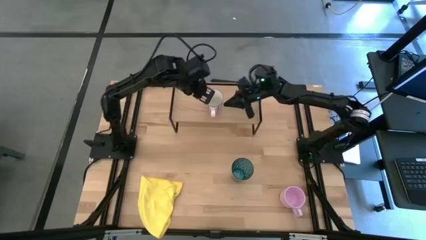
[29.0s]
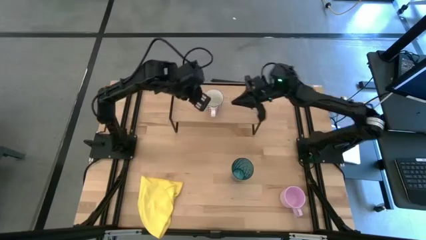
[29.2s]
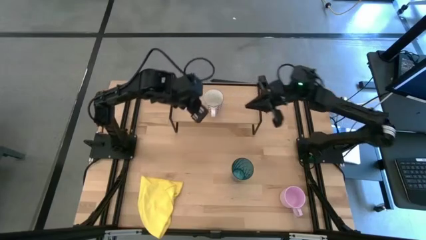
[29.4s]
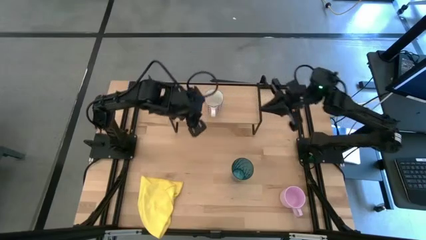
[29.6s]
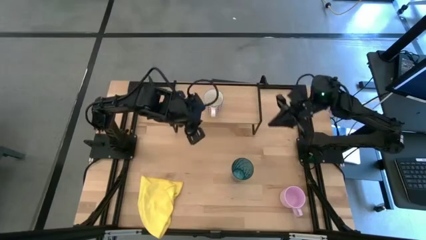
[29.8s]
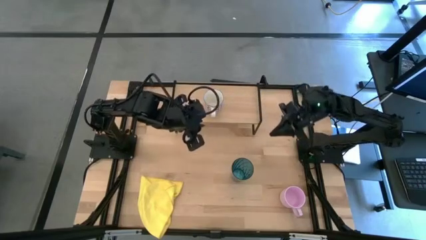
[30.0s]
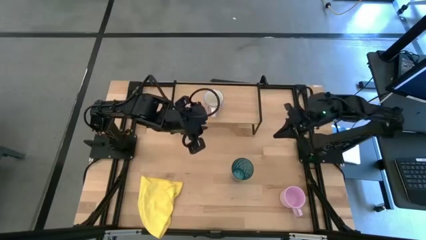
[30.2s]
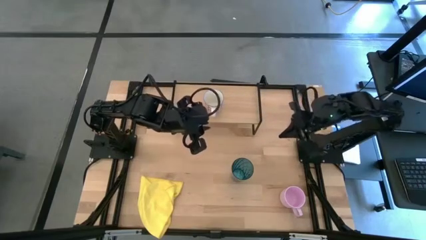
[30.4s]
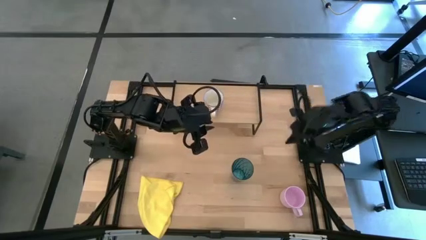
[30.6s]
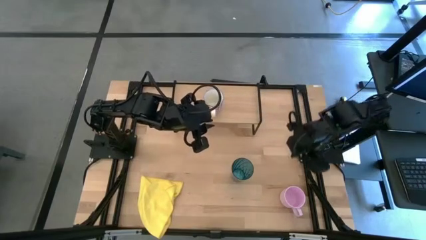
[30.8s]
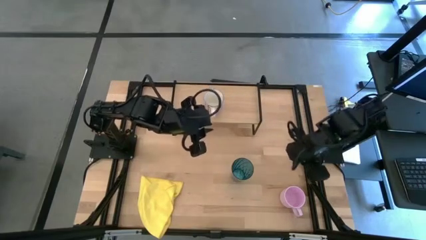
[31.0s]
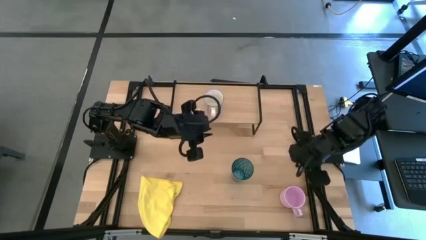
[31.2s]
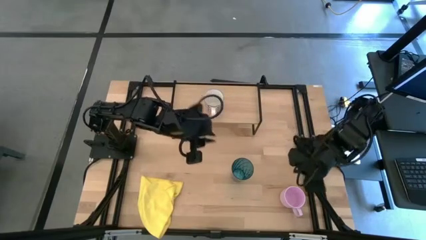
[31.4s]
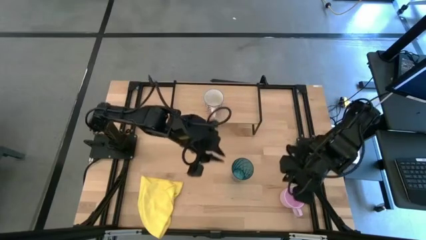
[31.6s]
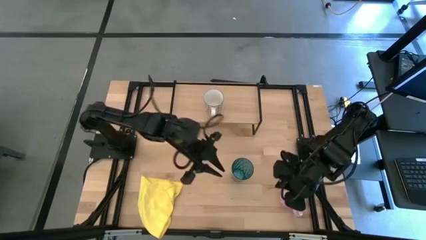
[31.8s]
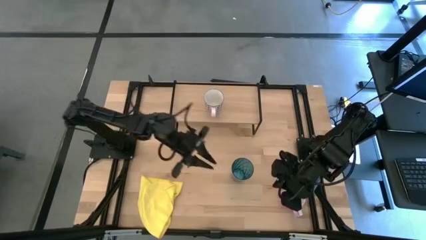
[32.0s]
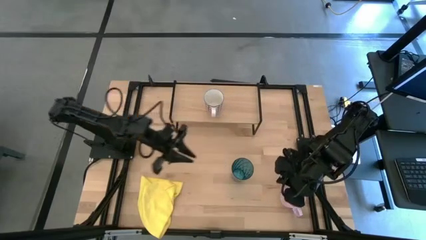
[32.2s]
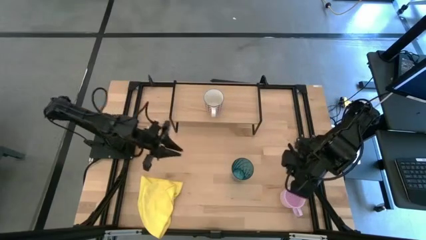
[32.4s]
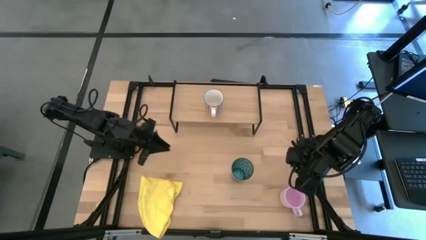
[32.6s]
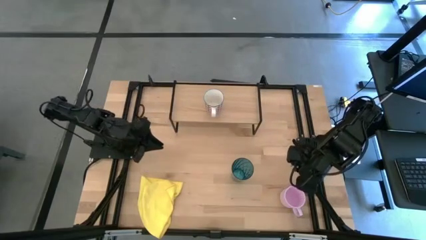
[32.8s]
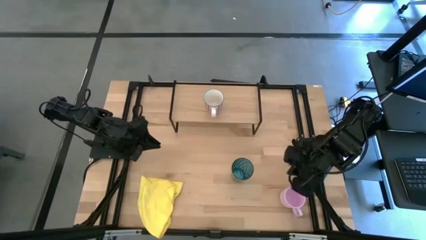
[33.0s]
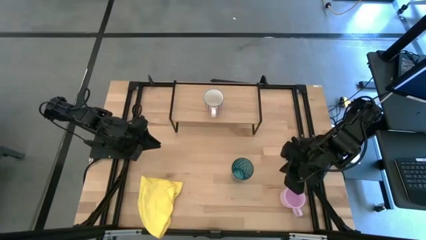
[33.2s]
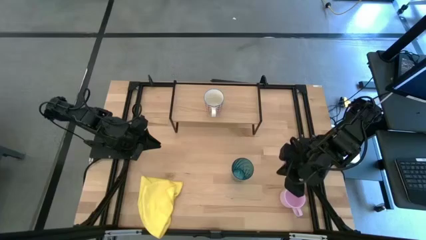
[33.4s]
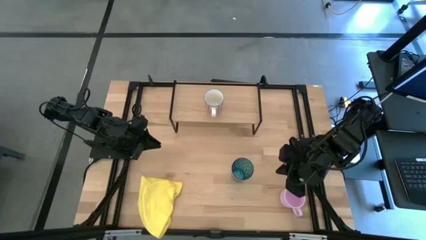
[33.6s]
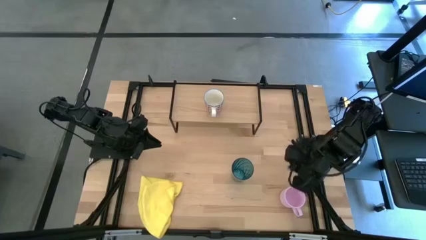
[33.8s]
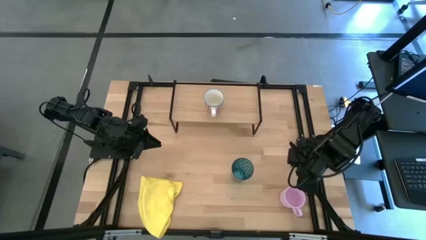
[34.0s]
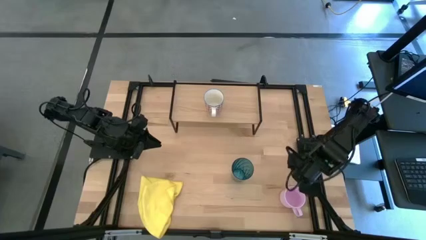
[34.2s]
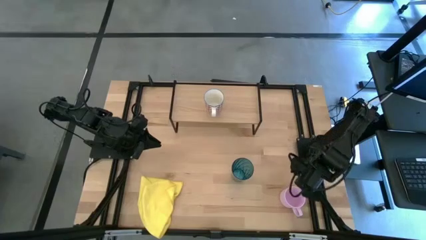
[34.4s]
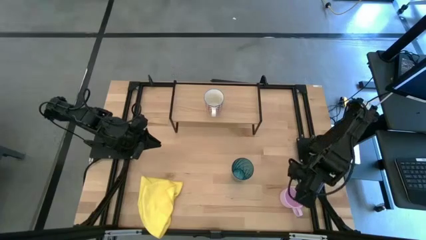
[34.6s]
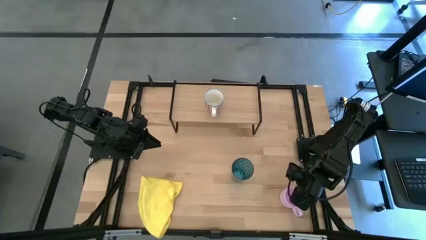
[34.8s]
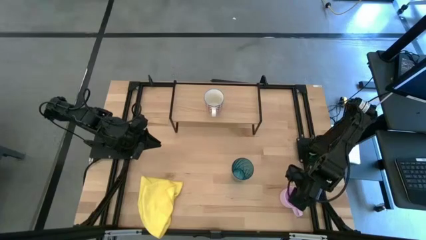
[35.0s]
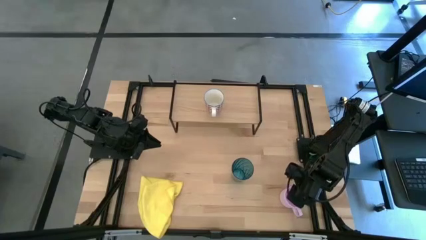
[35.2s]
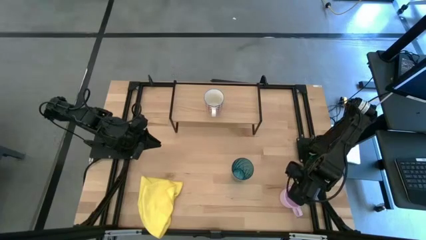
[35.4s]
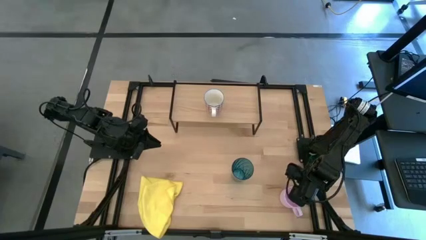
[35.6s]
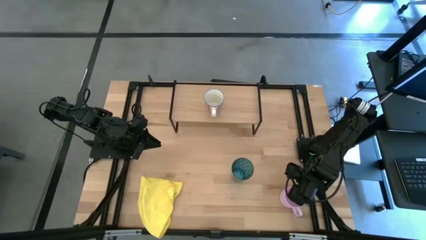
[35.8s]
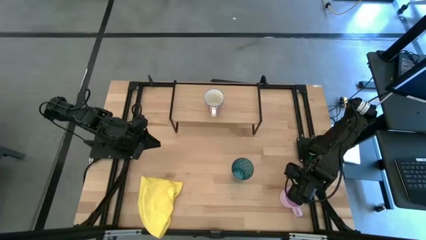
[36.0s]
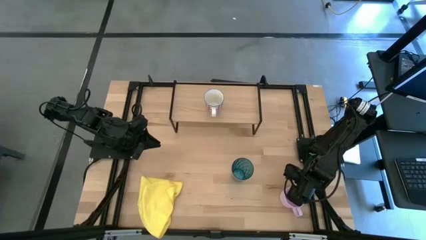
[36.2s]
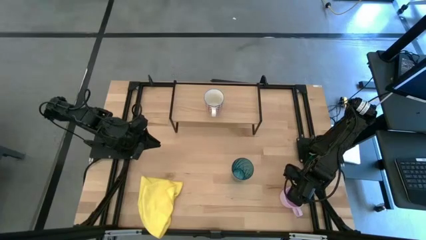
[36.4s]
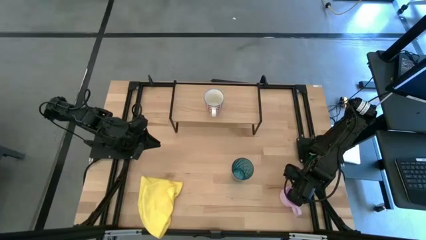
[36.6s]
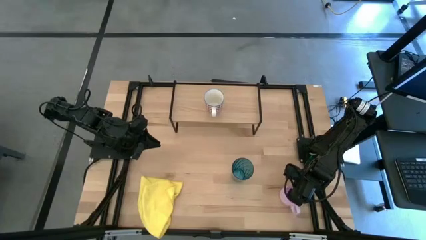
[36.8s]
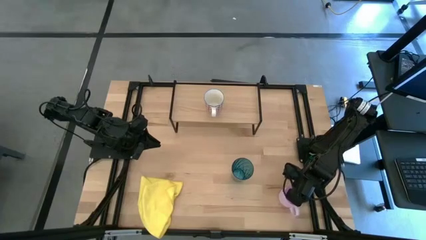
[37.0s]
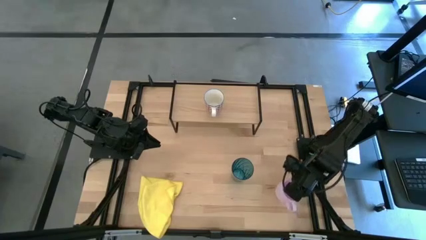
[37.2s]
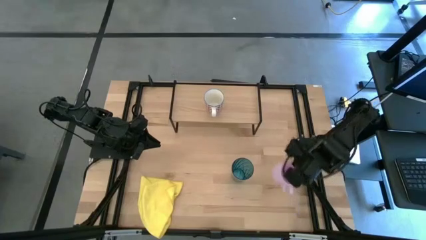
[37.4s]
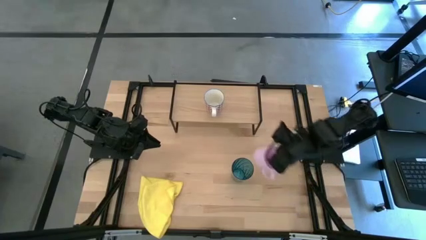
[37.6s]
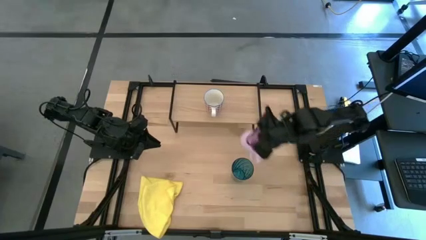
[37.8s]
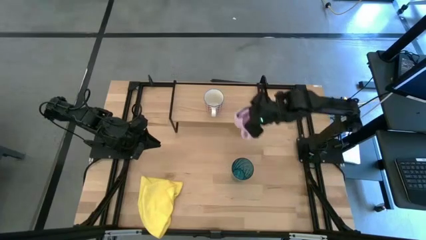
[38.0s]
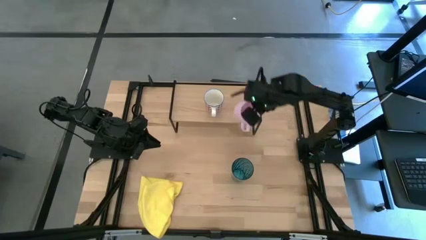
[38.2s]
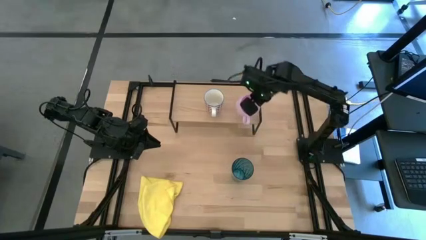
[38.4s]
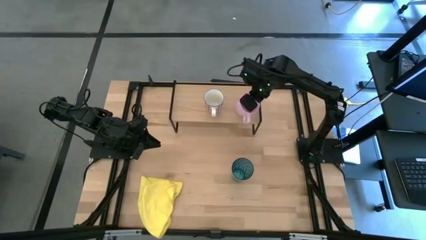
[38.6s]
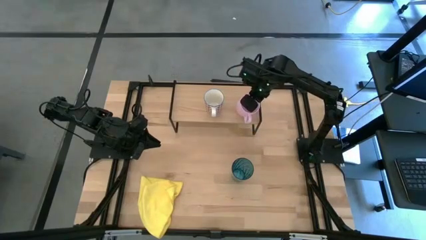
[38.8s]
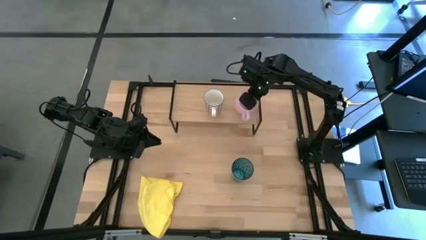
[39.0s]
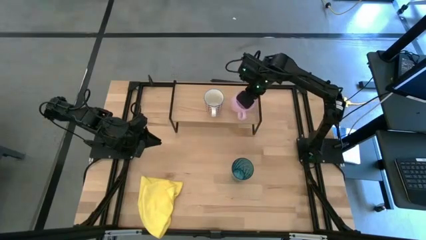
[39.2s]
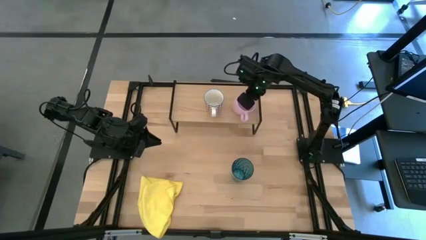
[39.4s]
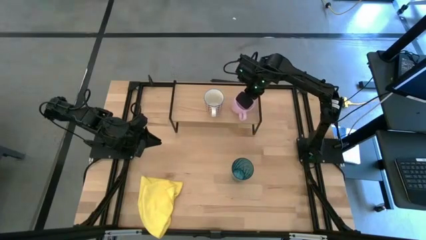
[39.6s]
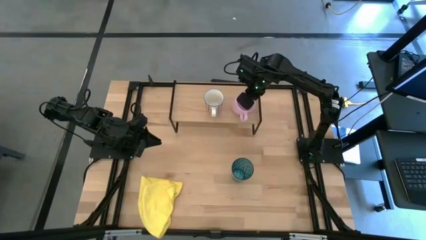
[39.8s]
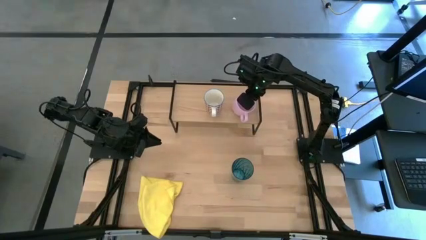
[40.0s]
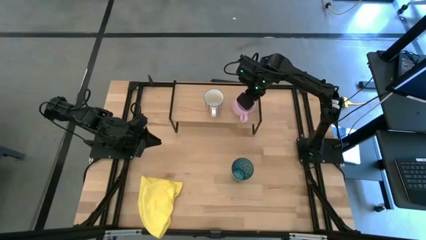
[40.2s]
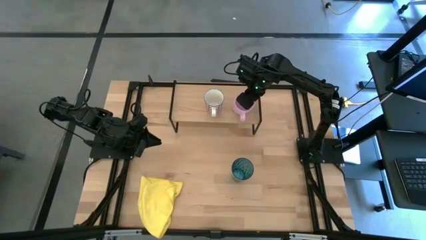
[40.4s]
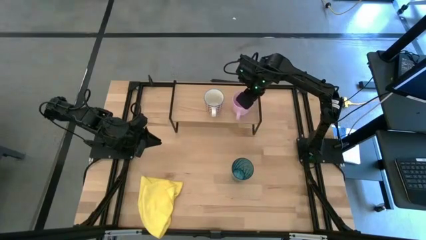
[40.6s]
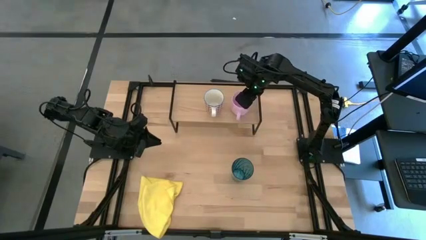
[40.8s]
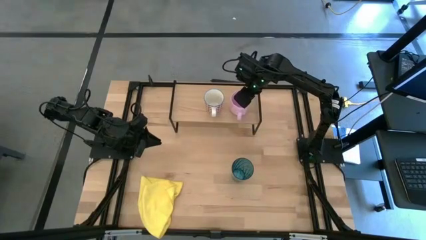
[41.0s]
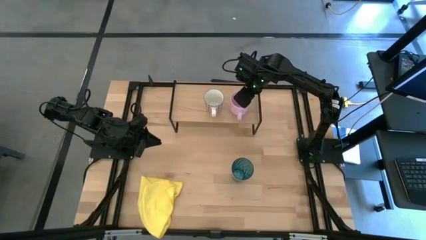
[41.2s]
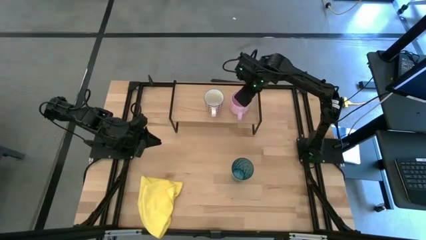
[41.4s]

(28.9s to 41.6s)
Task: Stack small to large cups/mugs on shelf
Put the pink mug on the shelf
